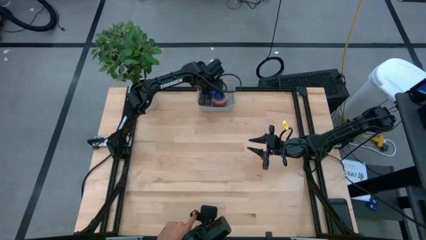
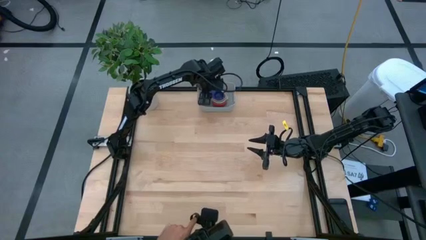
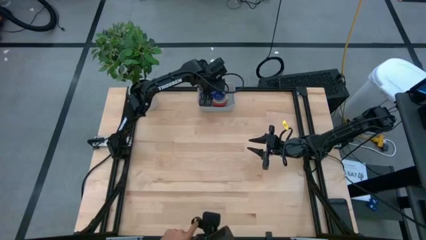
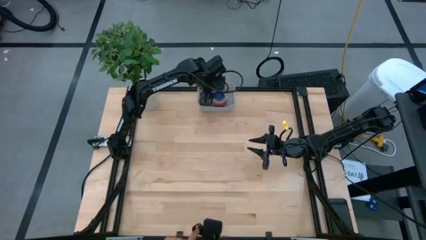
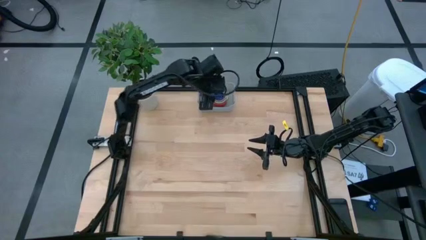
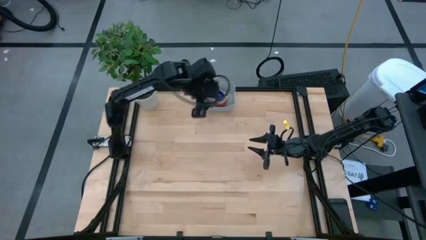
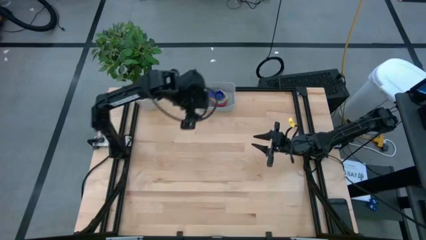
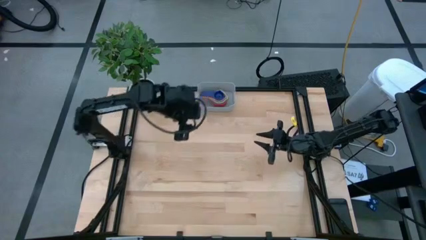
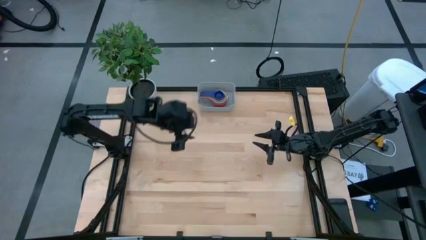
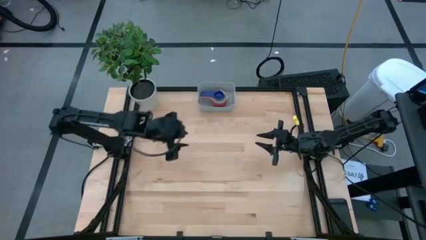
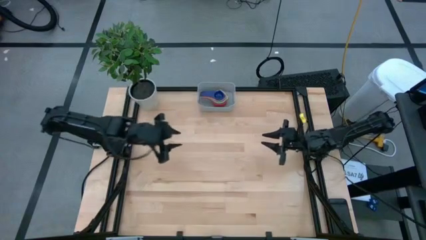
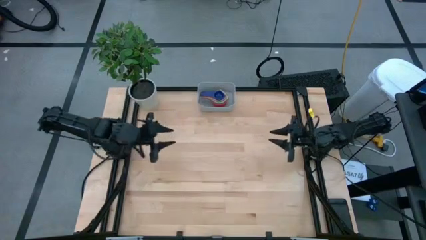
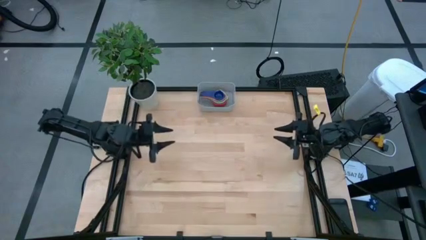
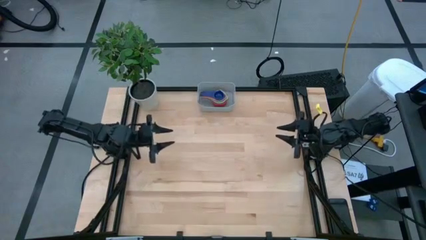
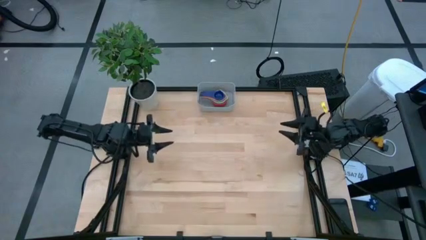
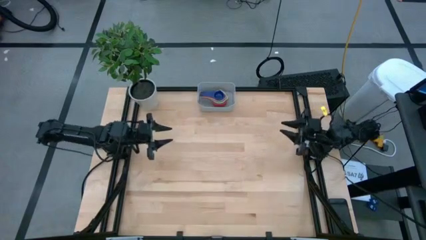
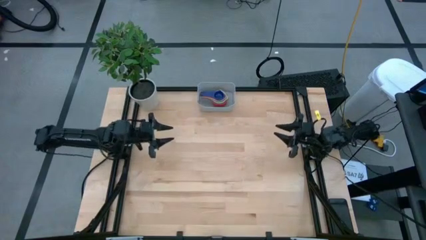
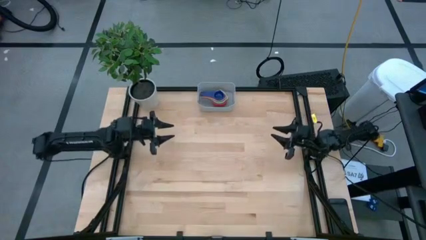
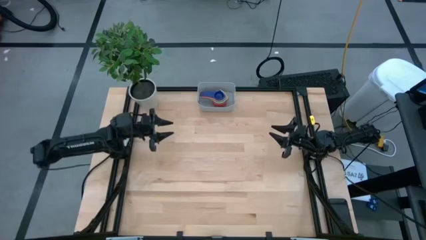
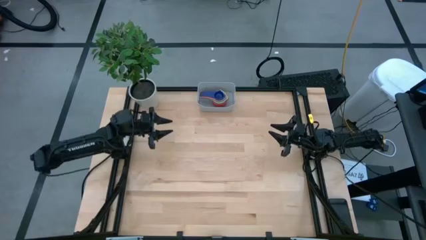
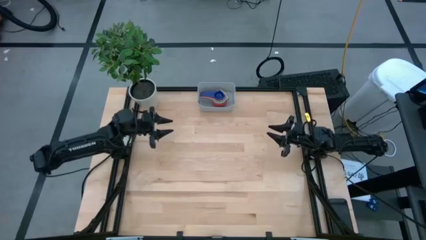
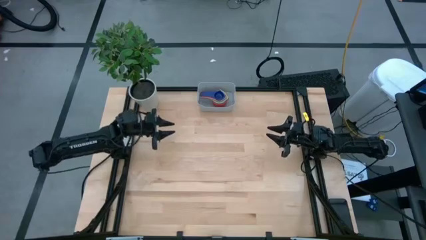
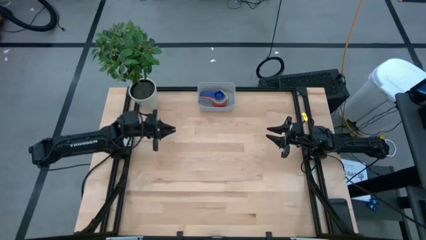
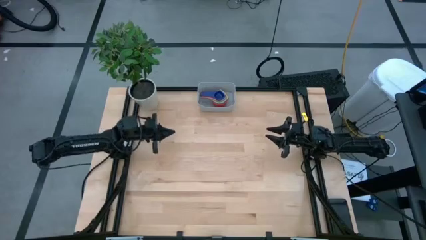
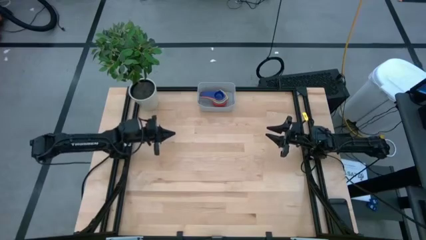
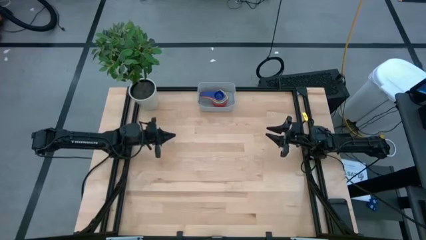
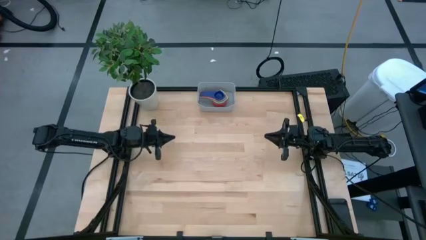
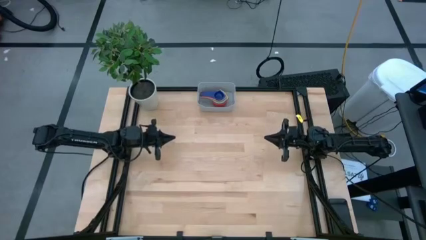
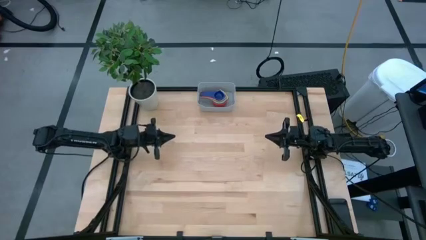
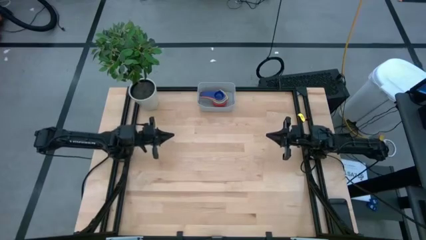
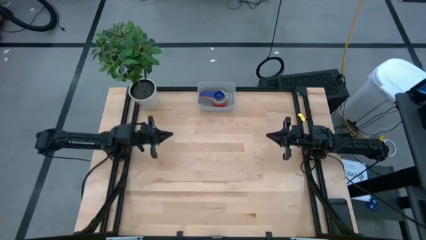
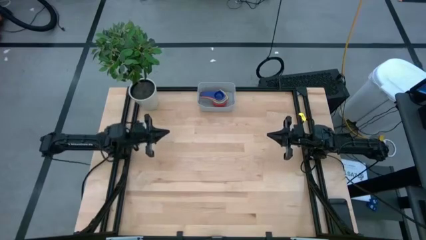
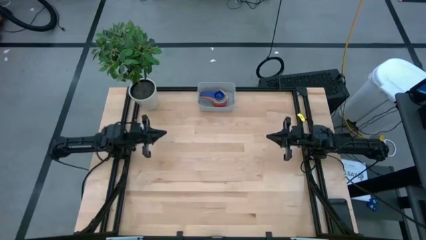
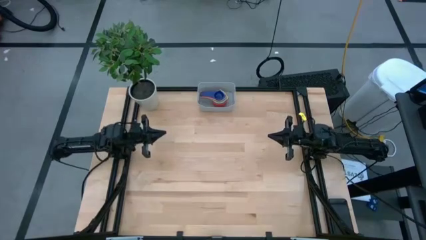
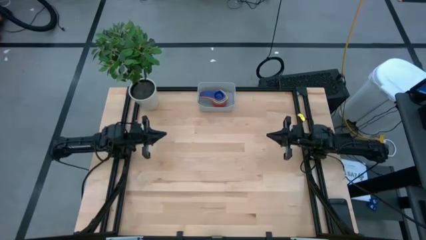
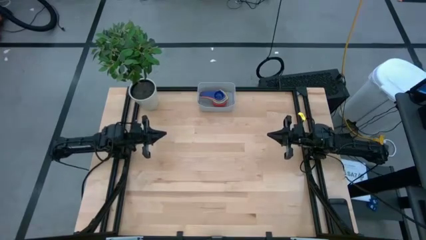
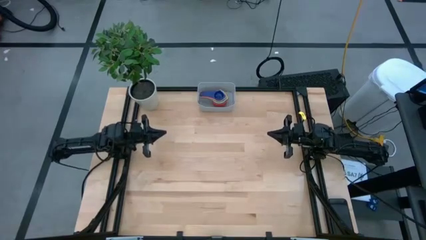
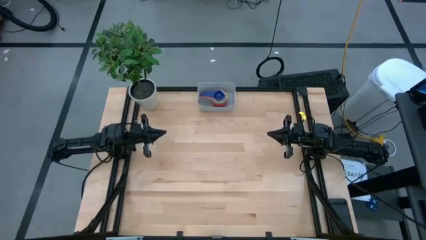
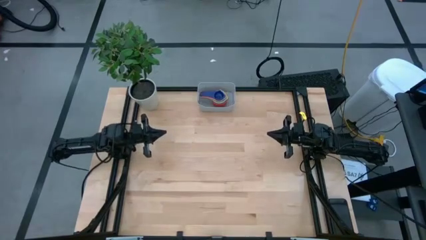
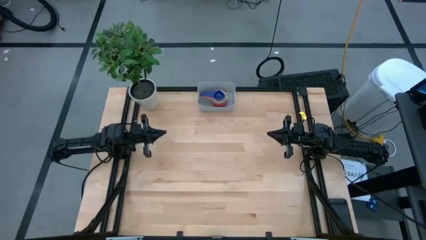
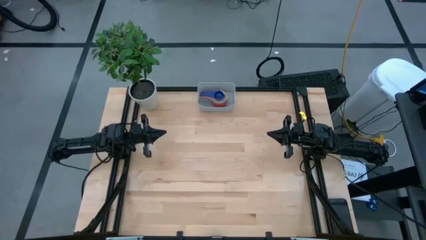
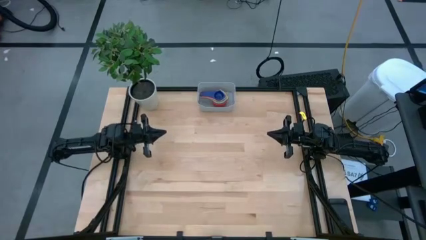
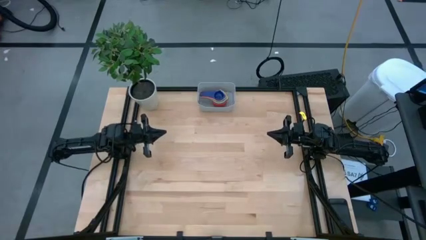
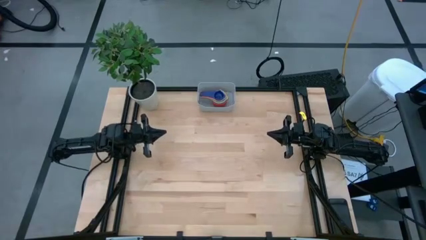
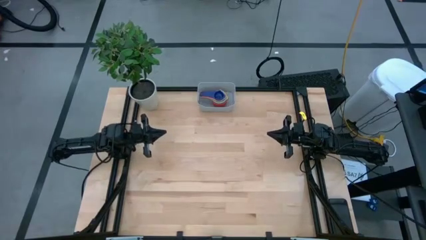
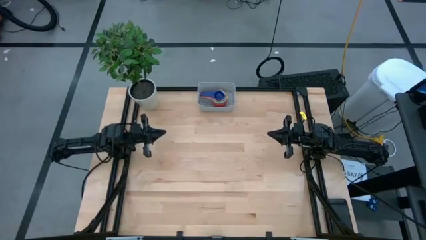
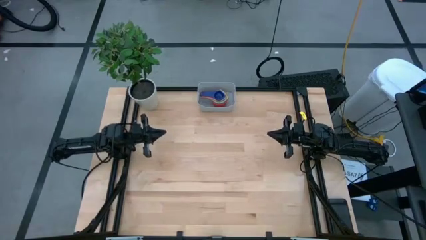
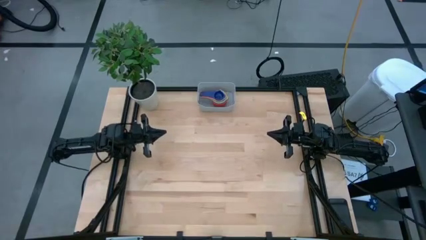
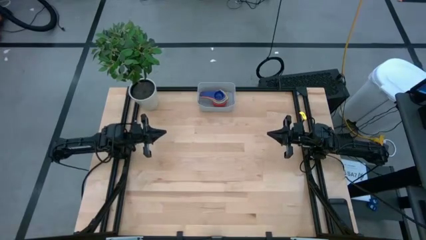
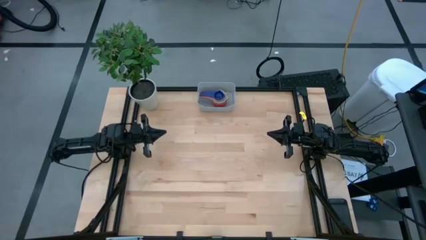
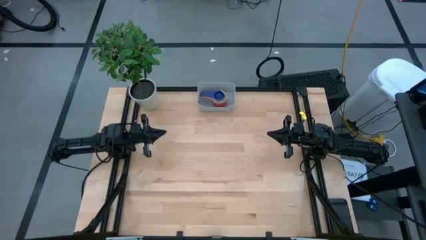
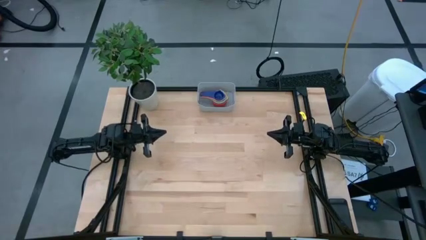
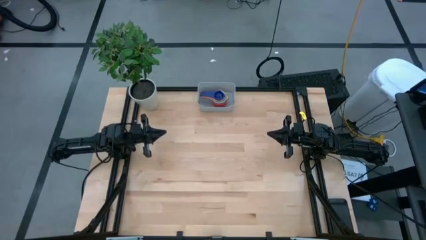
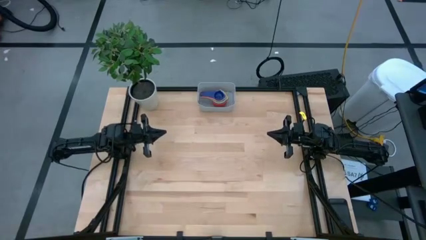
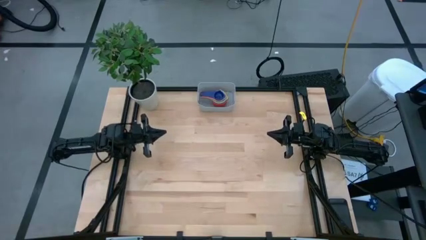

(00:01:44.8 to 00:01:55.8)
Task: Nest measuring cups in basket
Return to Home Position
